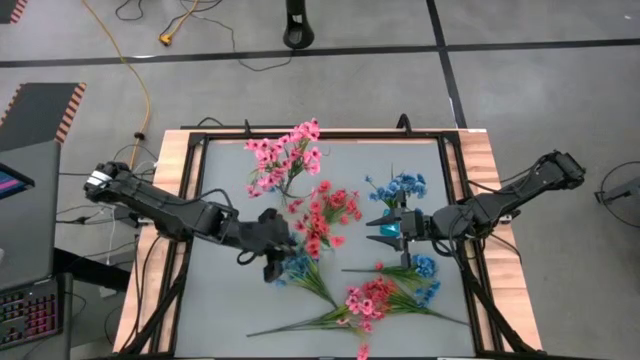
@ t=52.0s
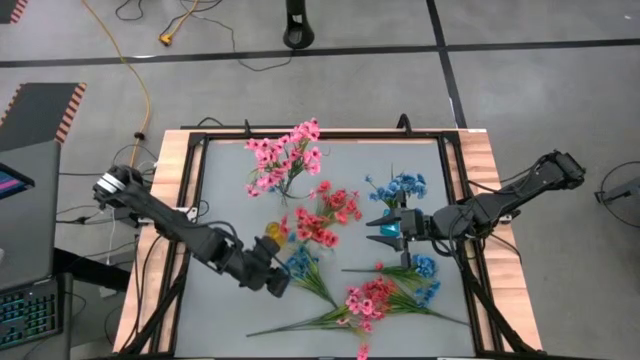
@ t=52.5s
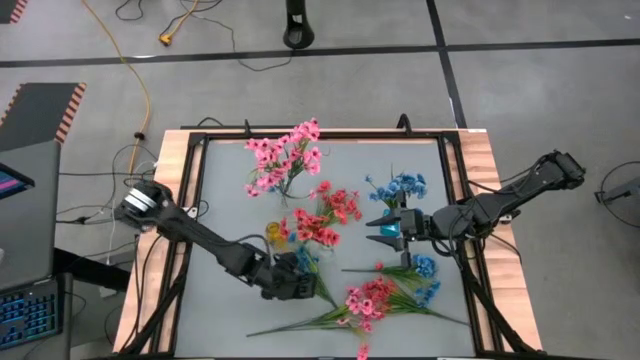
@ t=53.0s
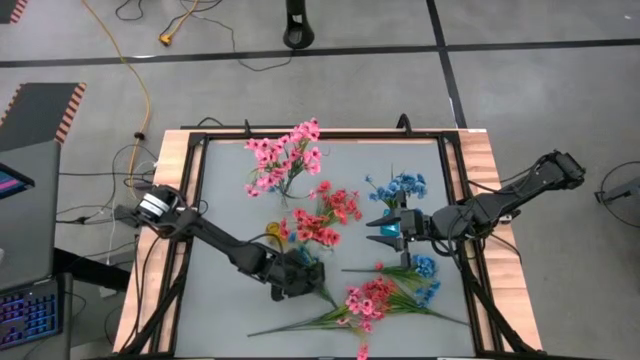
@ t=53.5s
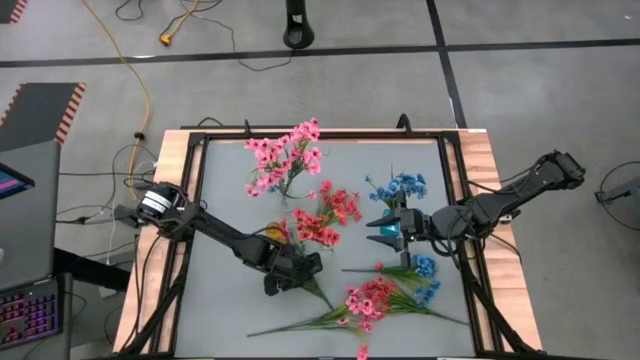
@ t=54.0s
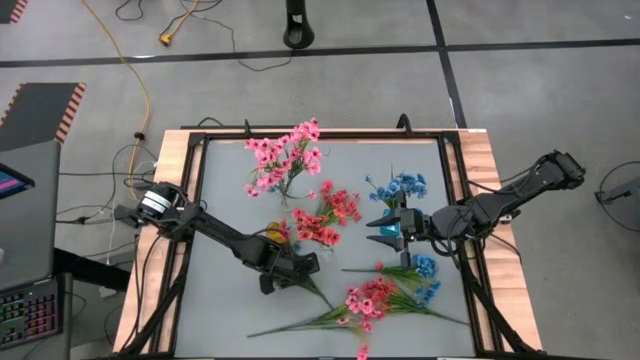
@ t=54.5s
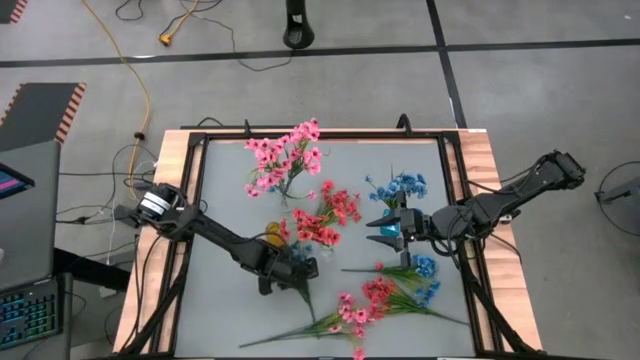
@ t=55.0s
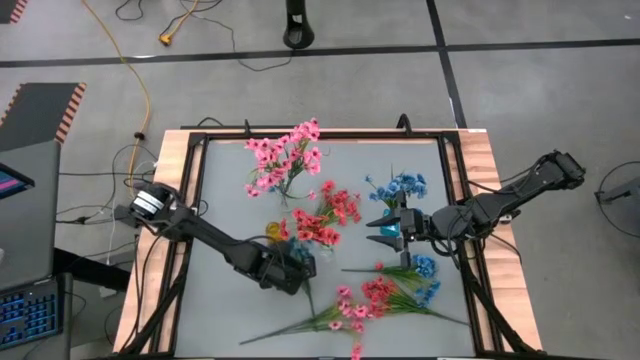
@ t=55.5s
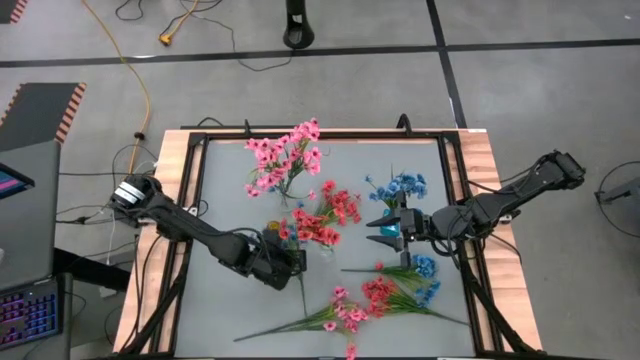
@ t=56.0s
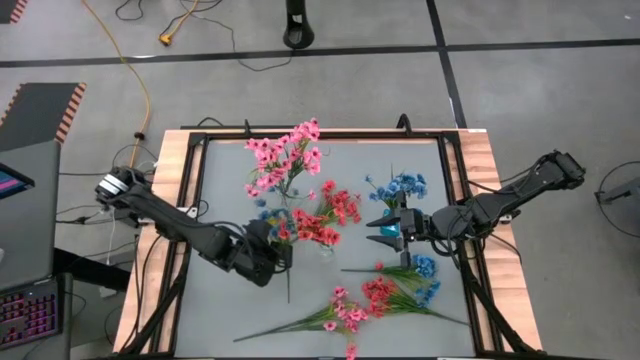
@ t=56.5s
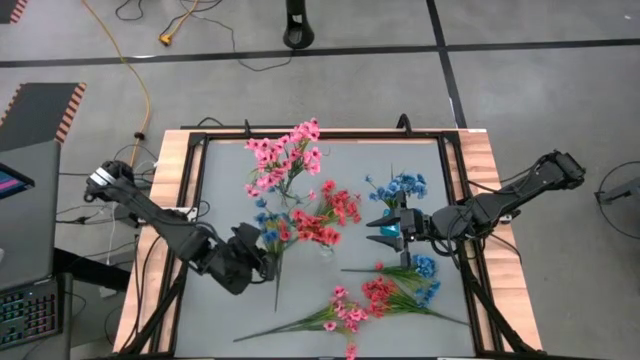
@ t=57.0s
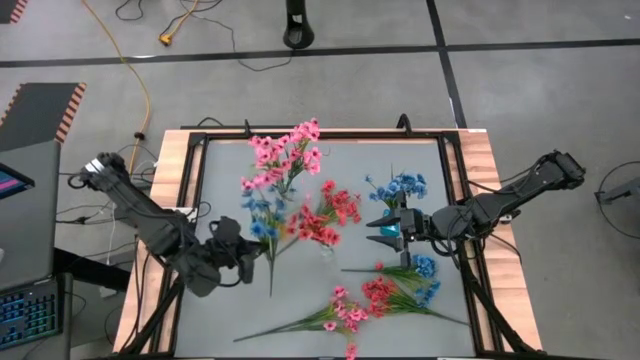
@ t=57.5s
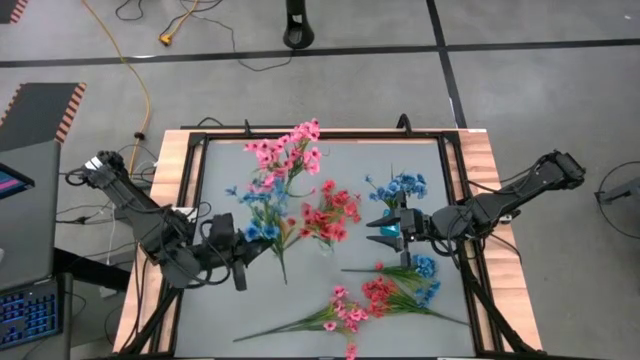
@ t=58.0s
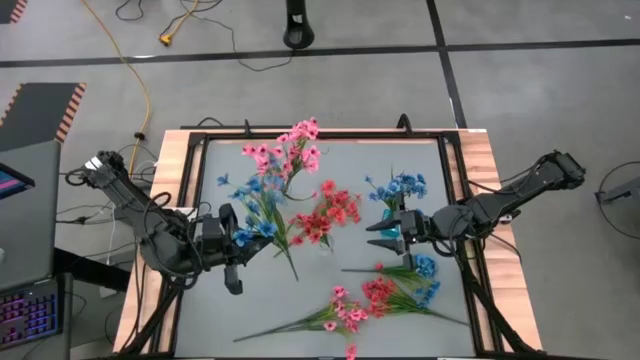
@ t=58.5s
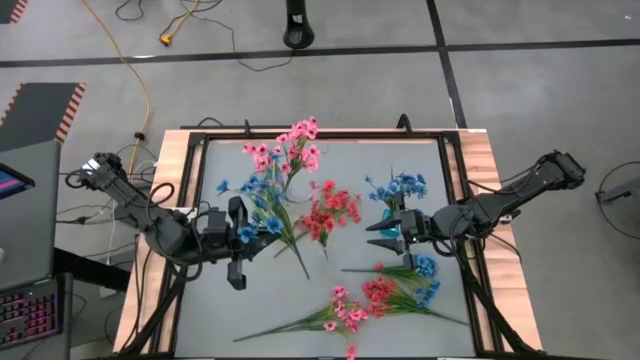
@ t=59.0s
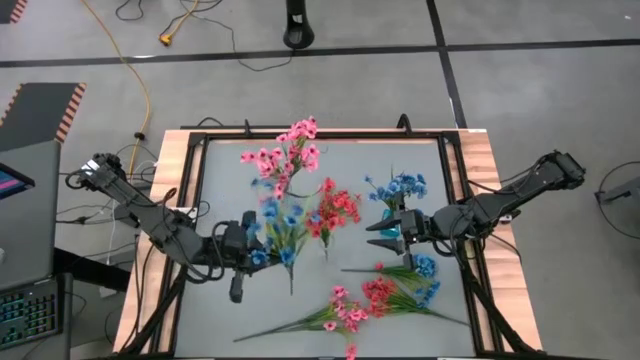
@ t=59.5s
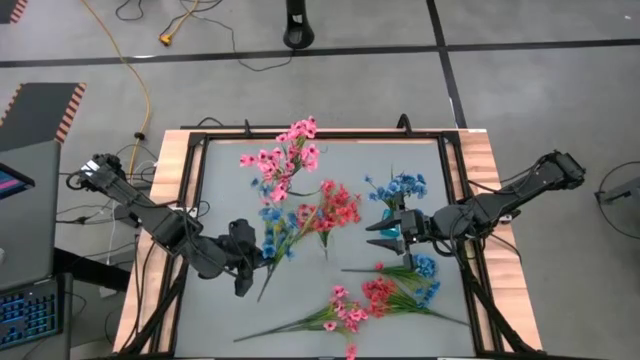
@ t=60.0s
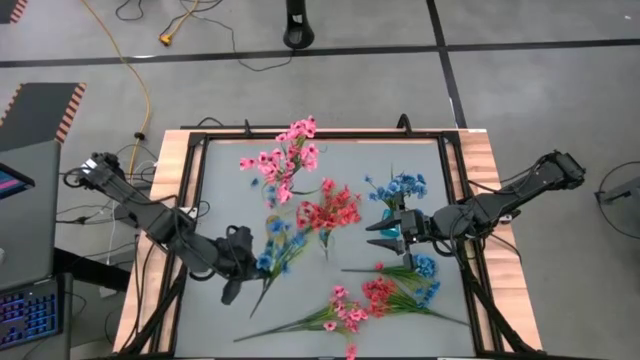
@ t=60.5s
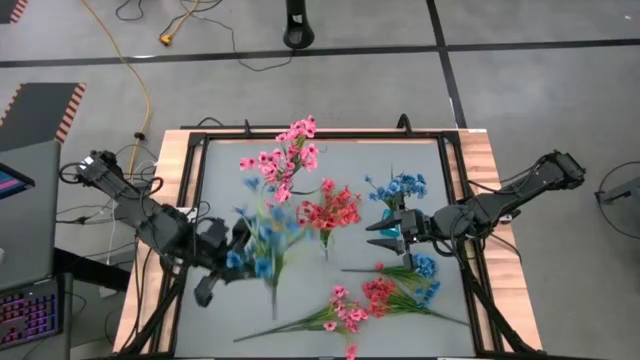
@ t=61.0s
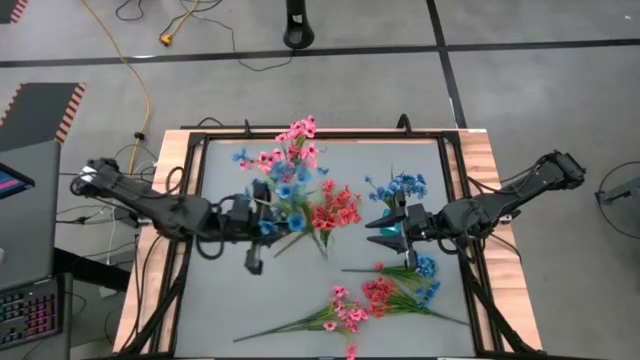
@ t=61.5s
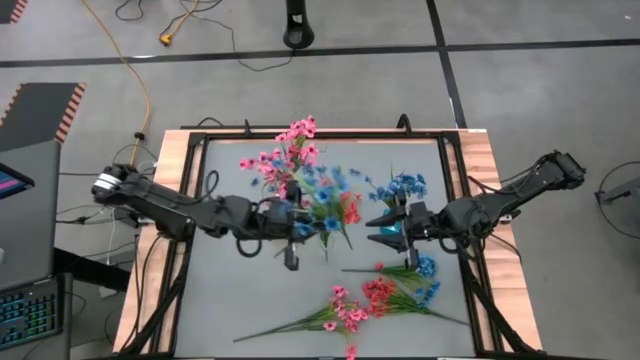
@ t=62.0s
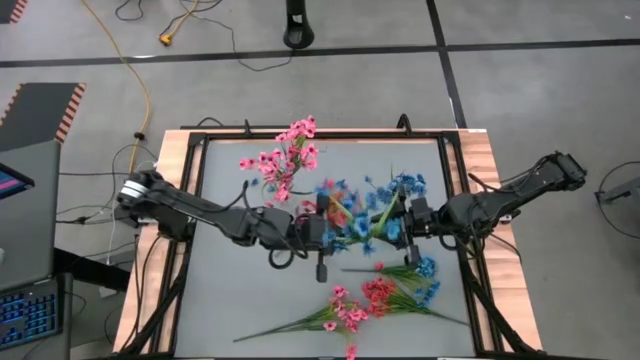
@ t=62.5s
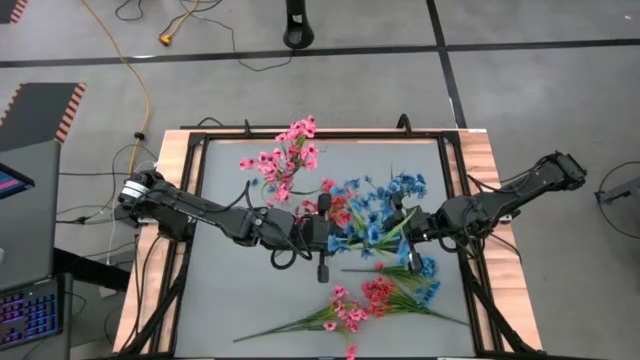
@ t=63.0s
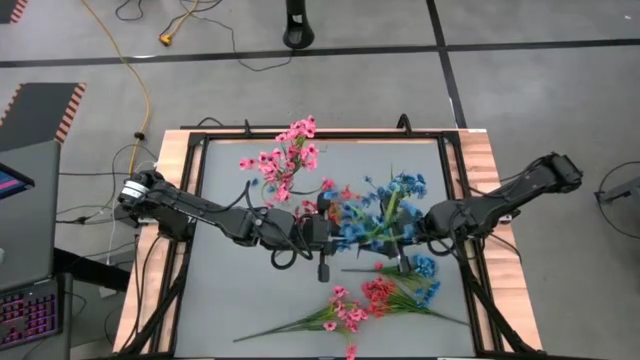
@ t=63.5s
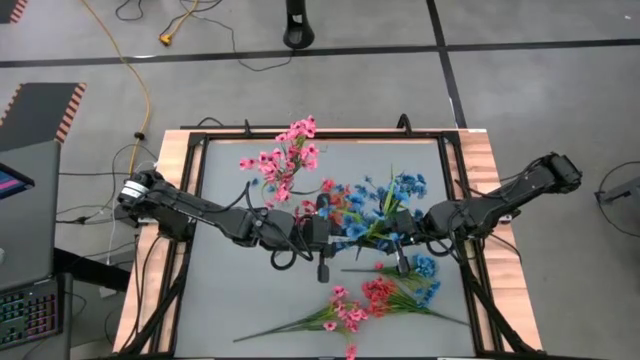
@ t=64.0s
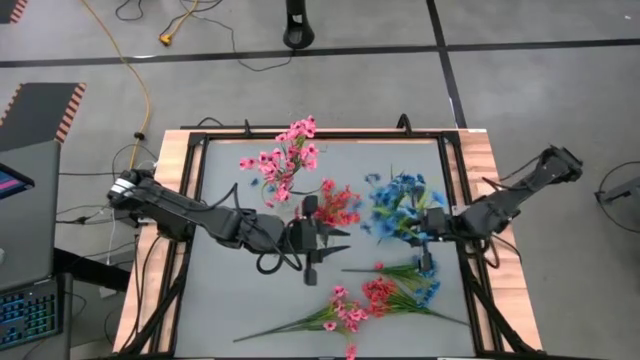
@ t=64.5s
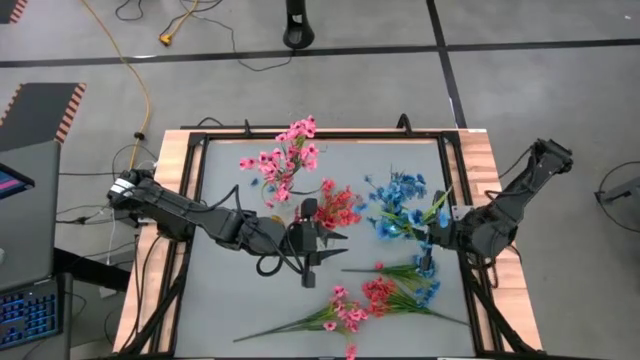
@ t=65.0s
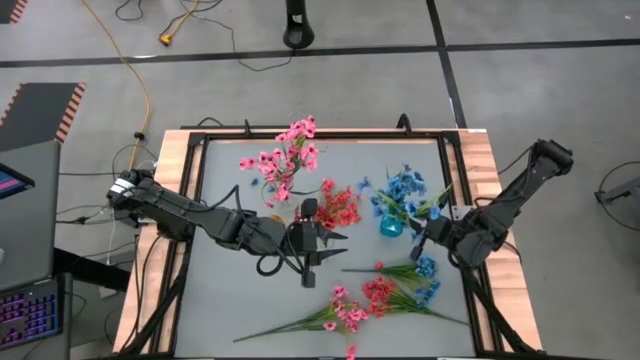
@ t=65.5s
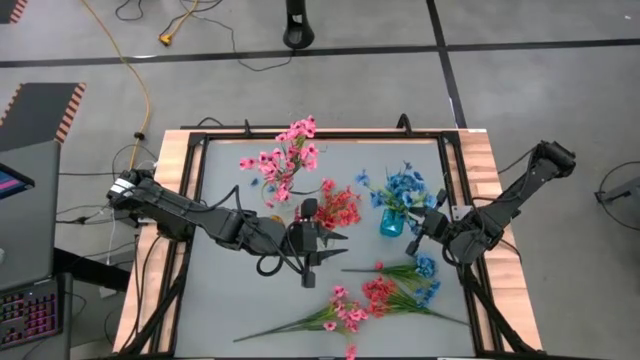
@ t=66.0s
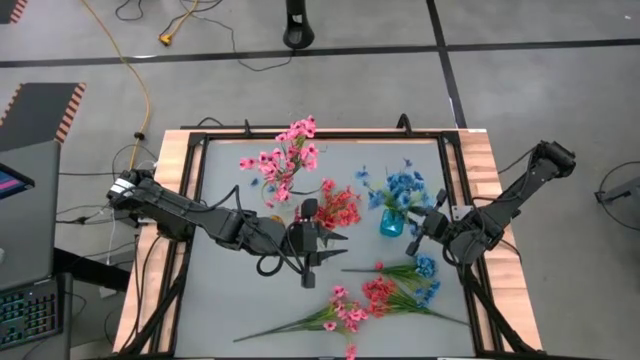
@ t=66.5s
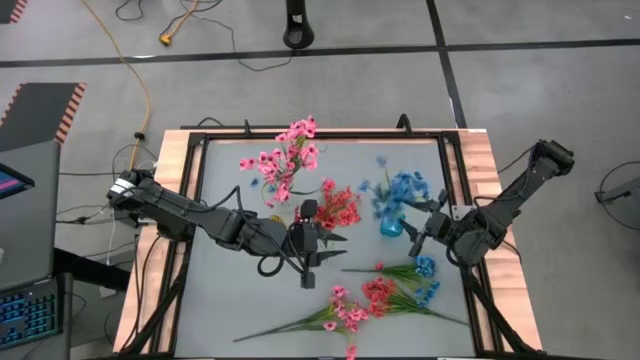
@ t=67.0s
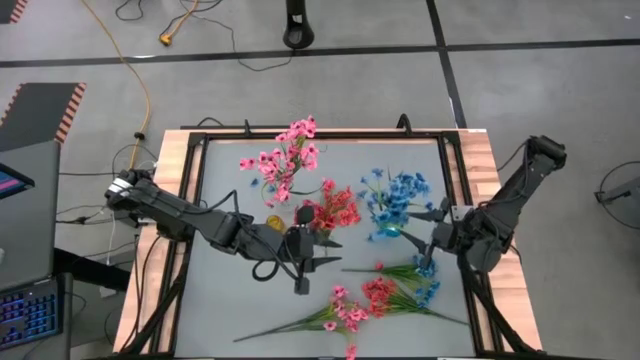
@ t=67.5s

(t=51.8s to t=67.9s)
Task: Sort flowers into vase by color
Put the left blue flowers into the blue vase

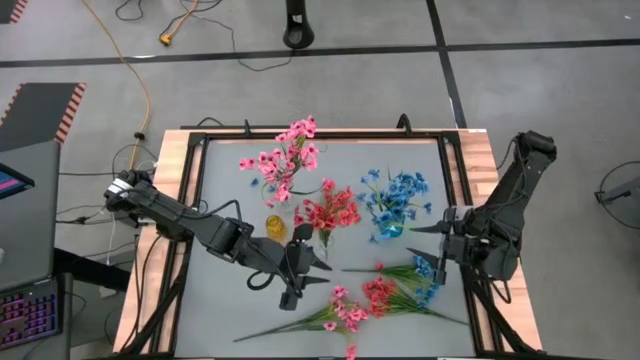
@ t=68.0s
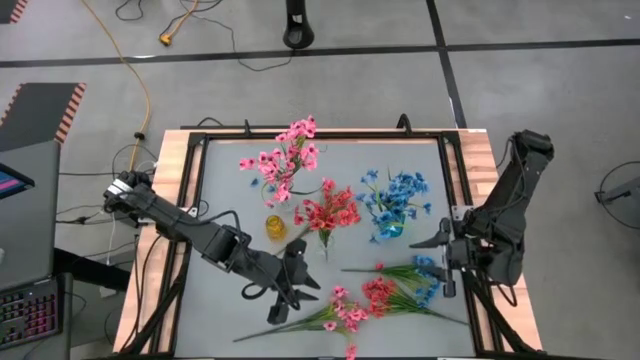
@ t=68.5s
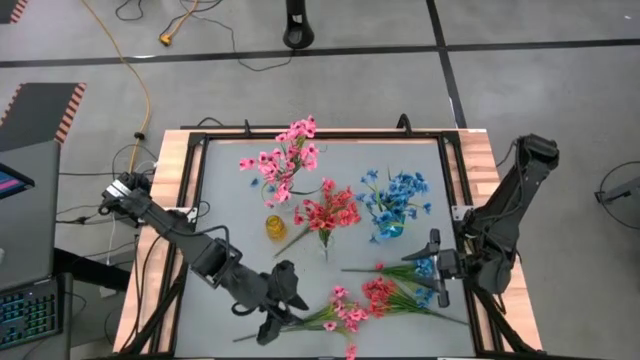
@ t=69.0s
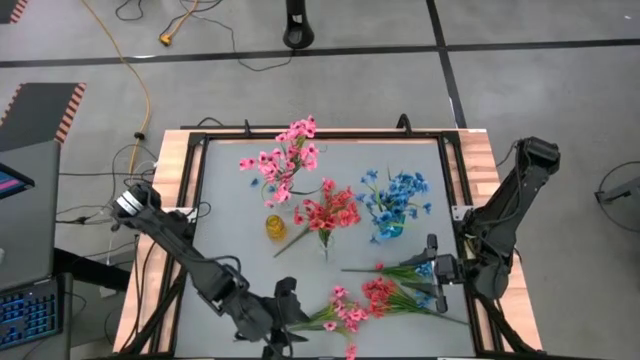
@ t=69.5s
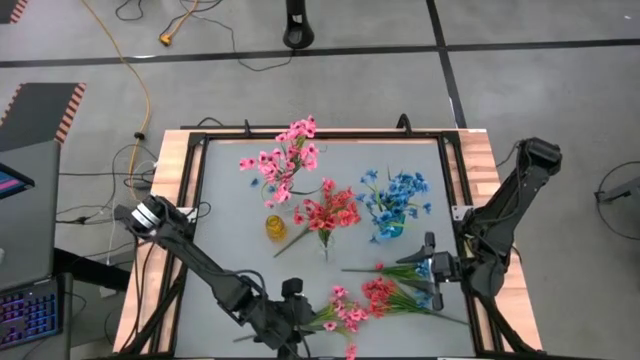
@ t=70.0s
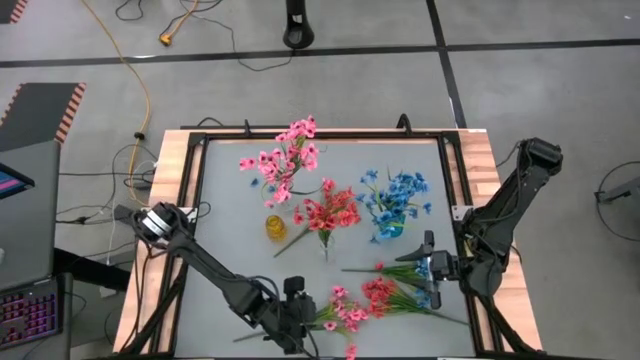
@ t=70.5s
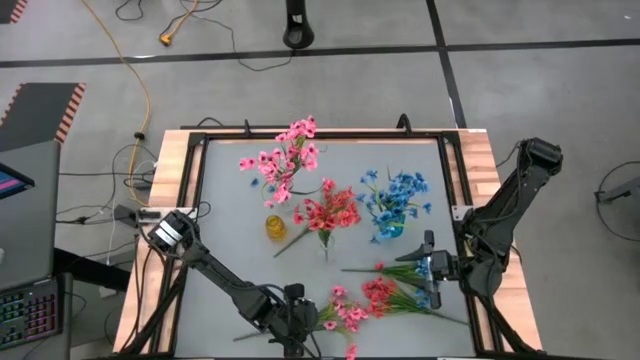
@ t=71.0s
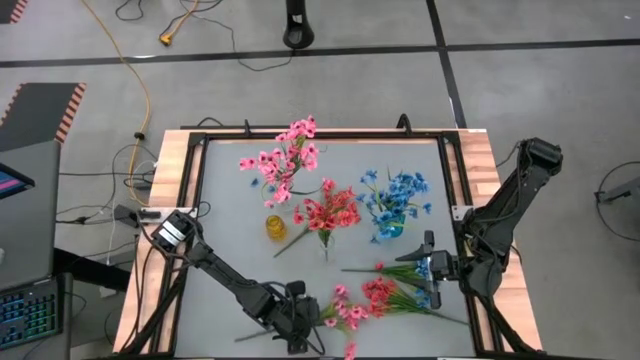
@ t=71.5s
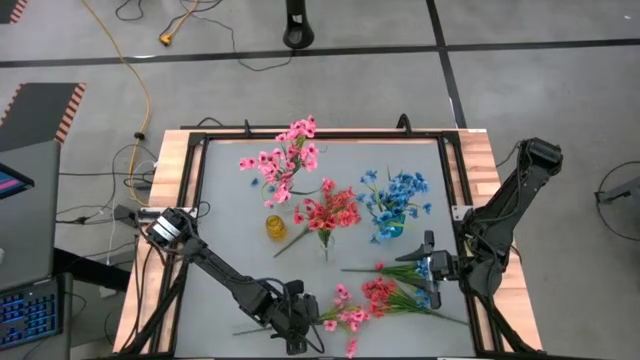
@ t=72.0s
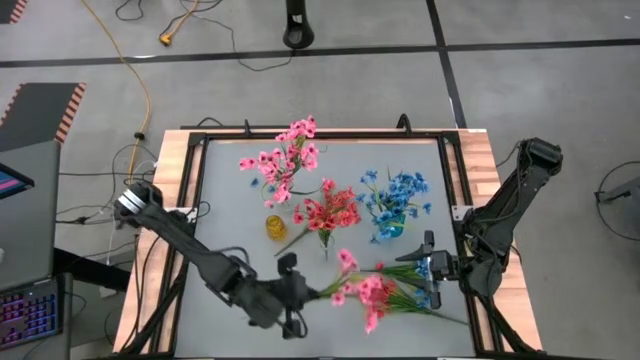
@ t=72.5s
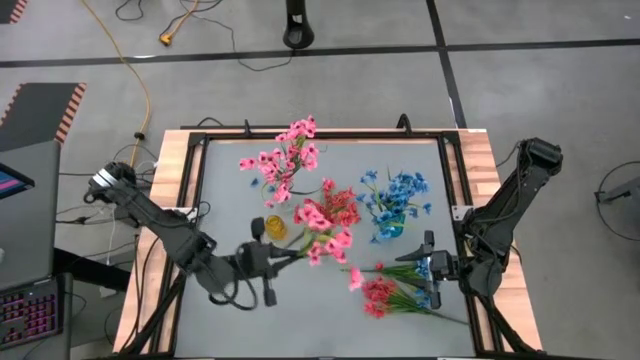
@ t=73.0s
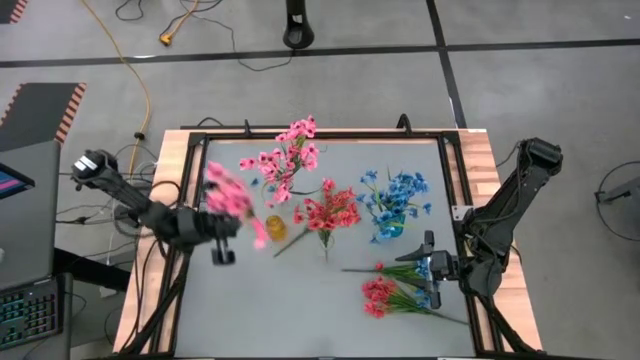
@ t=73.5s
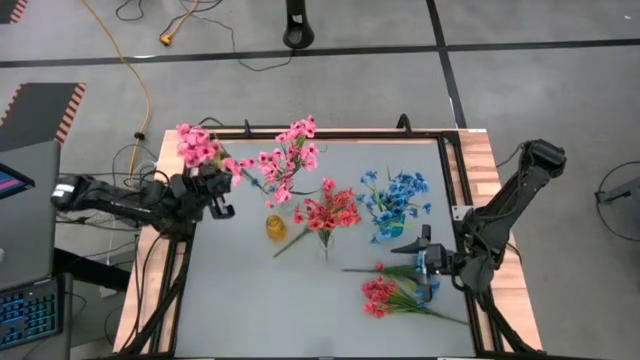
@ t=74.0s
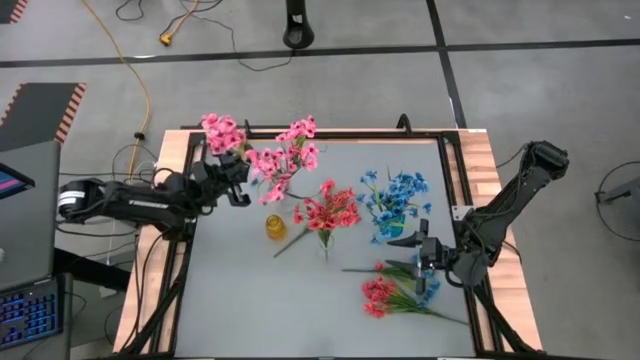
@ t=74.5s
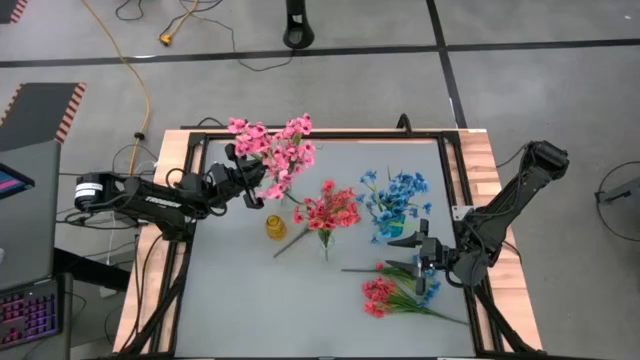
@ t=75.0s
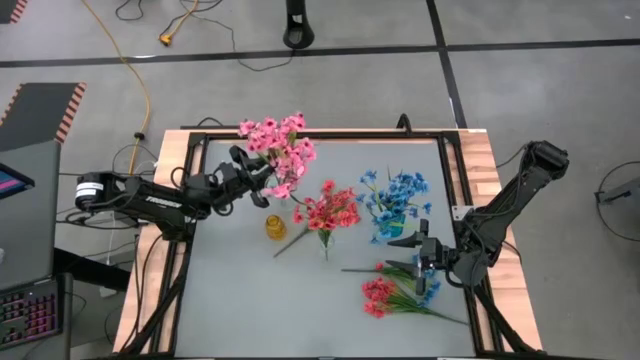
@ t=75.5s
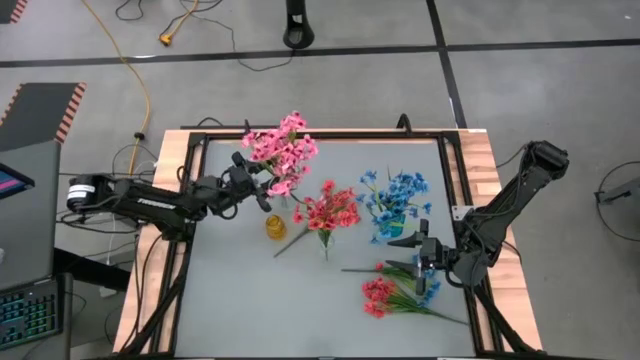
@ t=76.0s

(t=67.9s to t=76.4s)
Put the pink flowers into the top transparent bin
